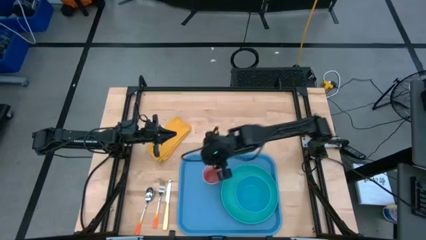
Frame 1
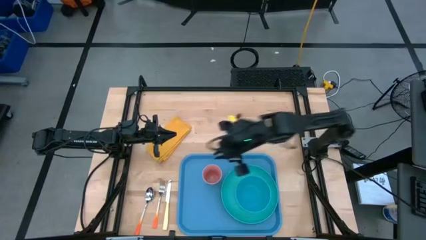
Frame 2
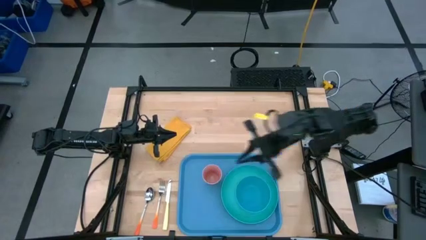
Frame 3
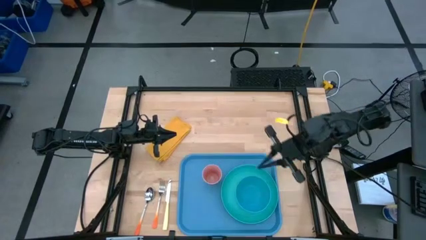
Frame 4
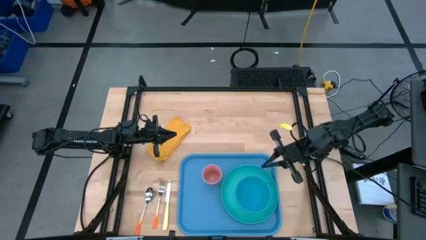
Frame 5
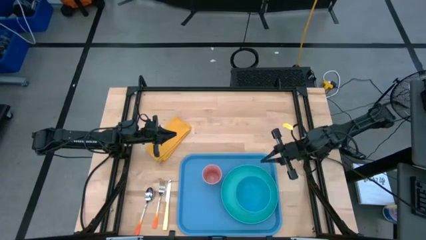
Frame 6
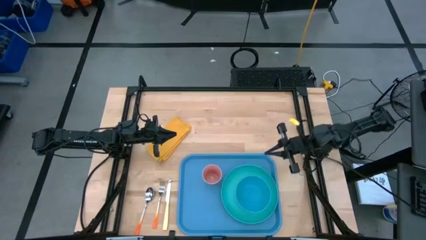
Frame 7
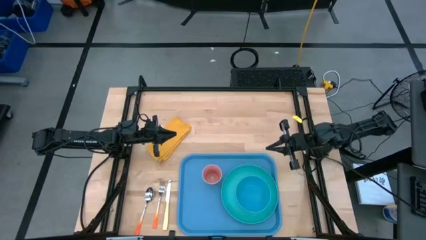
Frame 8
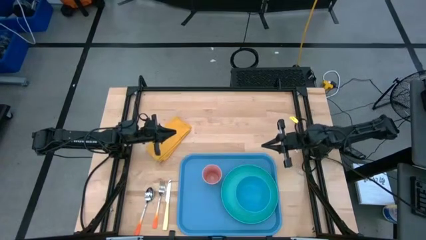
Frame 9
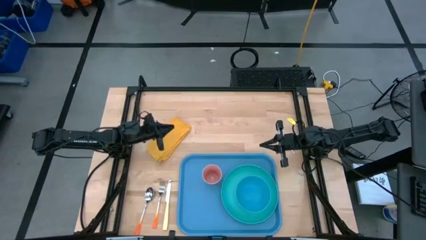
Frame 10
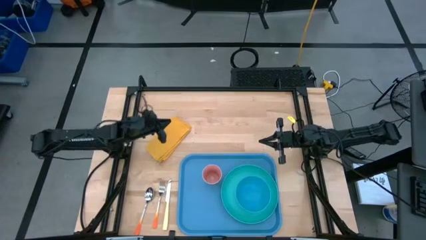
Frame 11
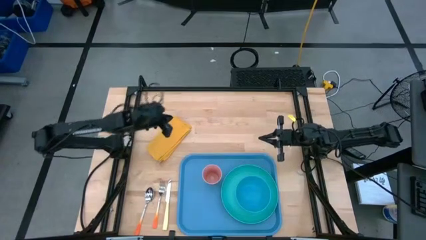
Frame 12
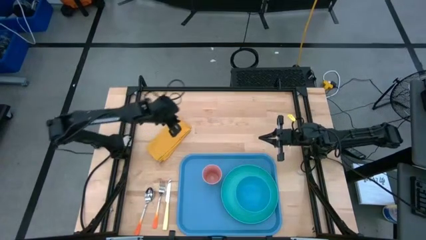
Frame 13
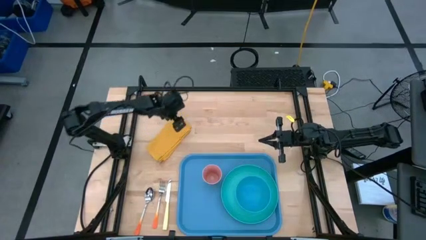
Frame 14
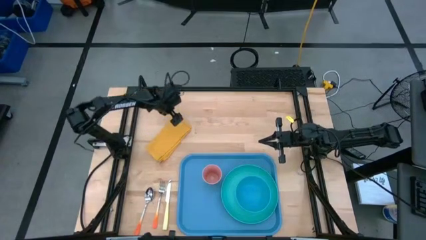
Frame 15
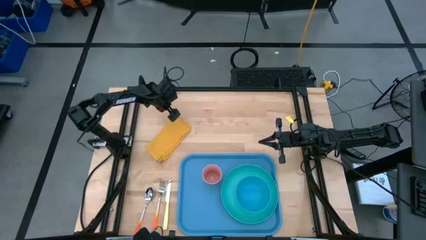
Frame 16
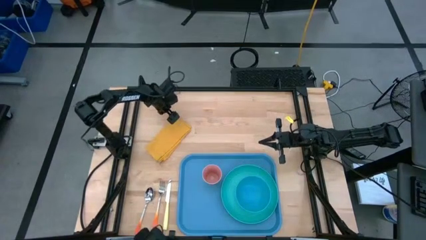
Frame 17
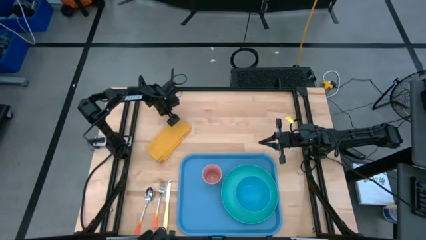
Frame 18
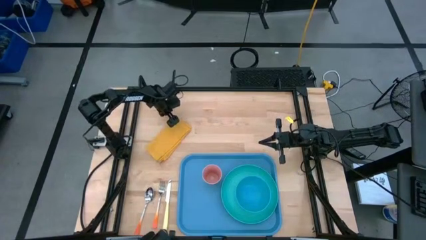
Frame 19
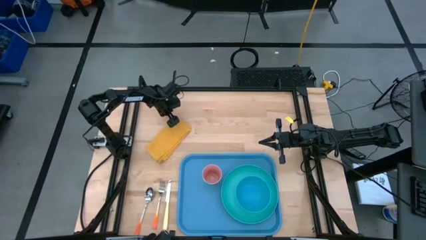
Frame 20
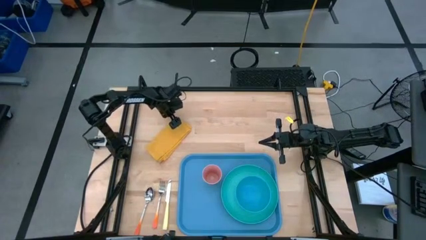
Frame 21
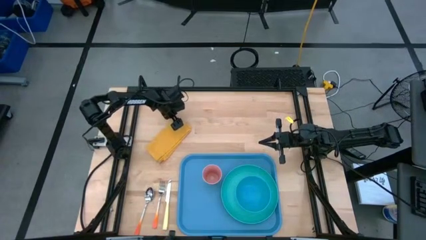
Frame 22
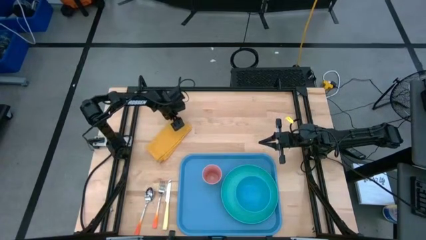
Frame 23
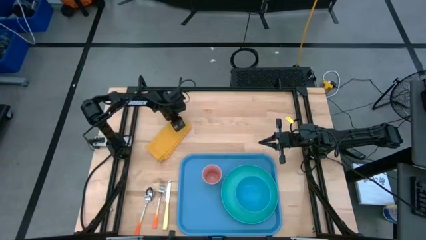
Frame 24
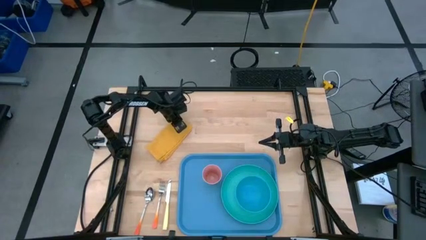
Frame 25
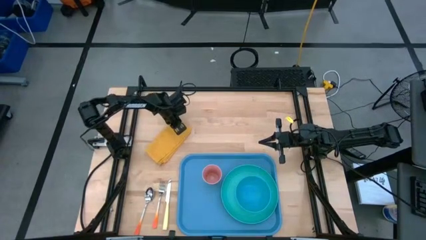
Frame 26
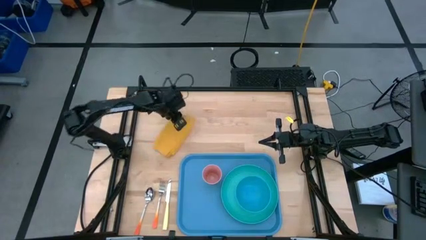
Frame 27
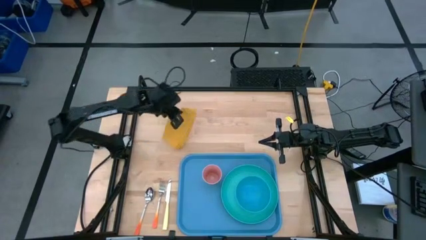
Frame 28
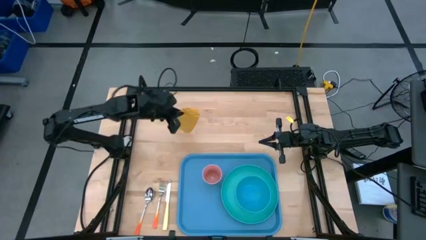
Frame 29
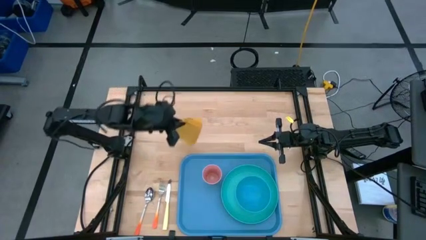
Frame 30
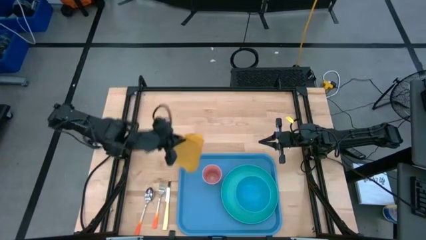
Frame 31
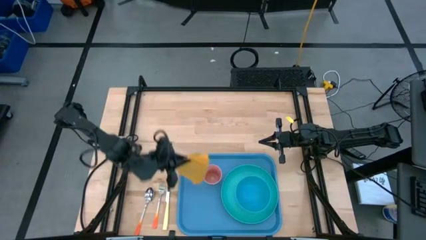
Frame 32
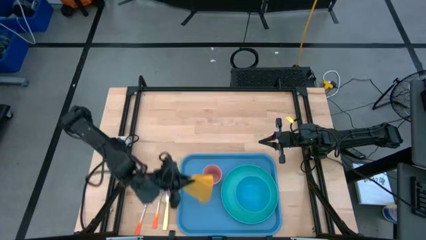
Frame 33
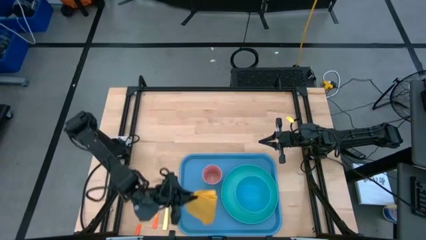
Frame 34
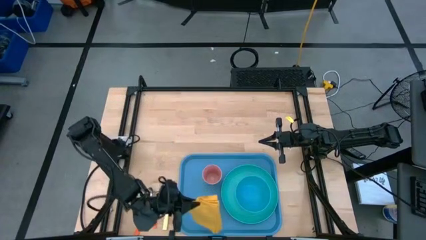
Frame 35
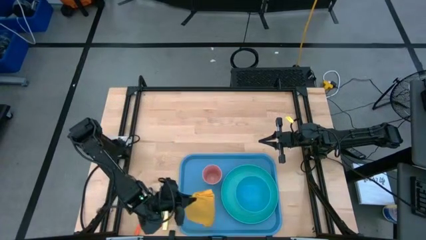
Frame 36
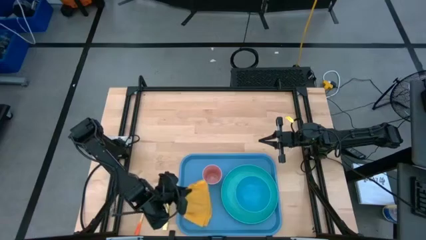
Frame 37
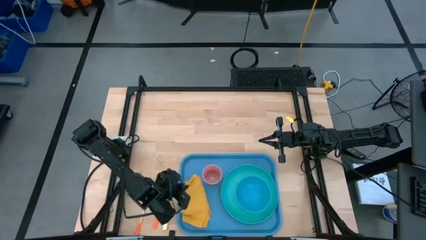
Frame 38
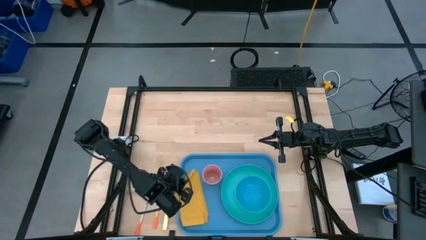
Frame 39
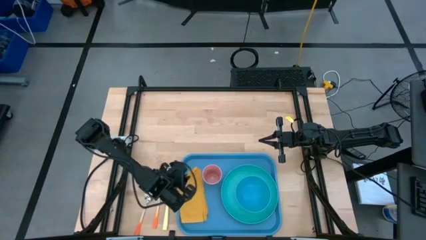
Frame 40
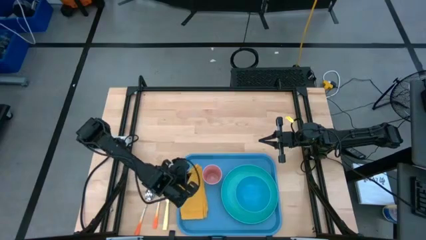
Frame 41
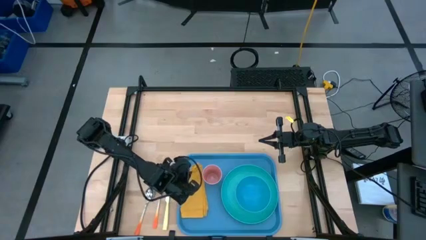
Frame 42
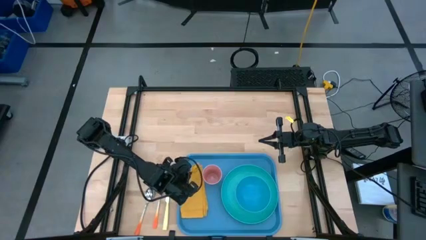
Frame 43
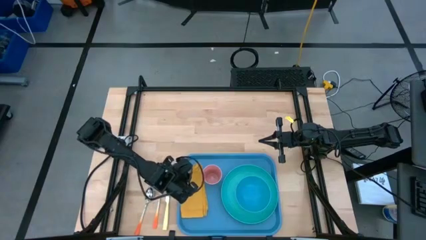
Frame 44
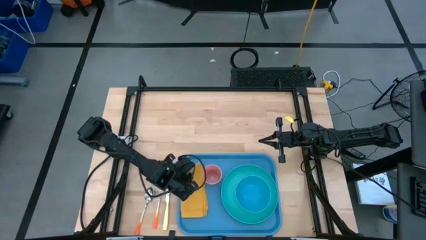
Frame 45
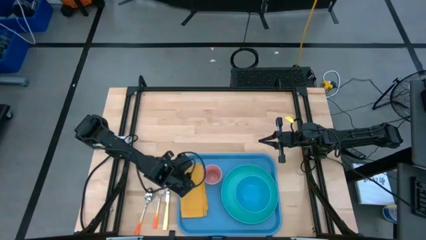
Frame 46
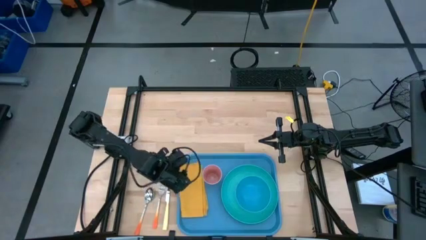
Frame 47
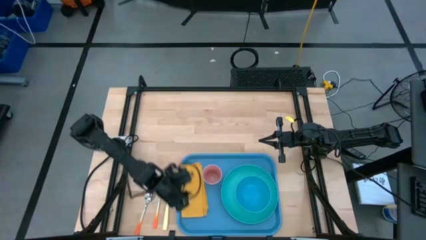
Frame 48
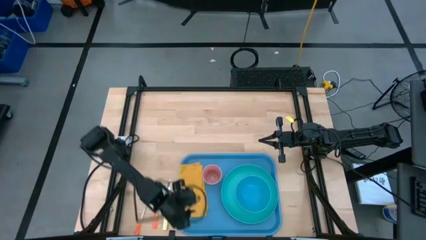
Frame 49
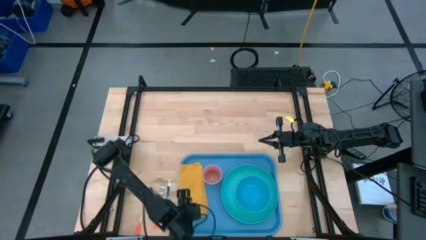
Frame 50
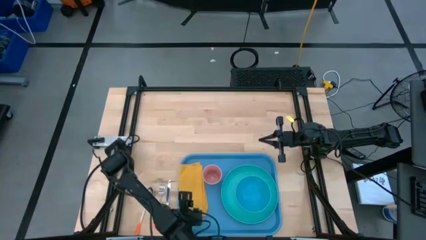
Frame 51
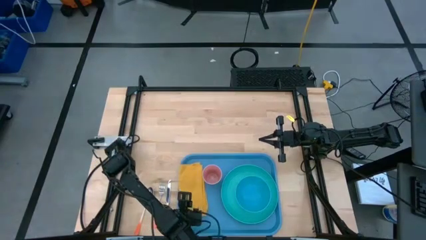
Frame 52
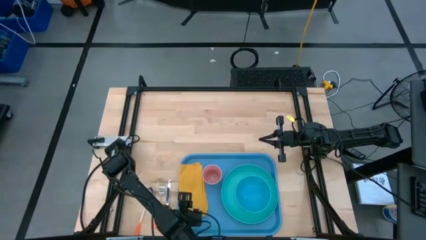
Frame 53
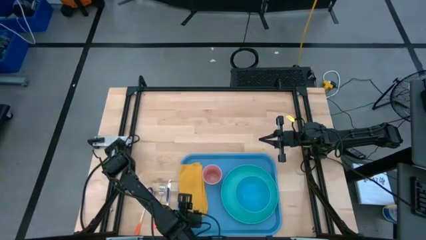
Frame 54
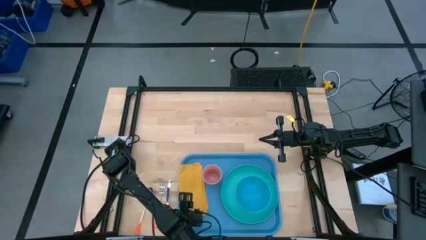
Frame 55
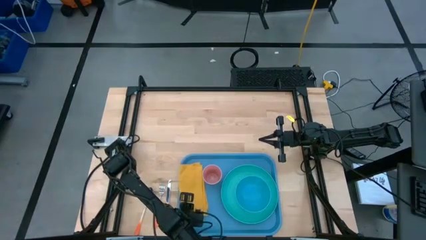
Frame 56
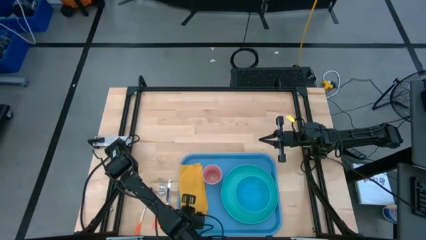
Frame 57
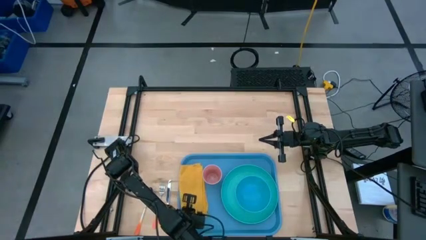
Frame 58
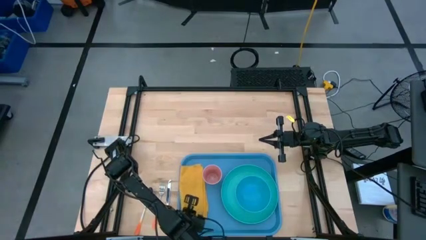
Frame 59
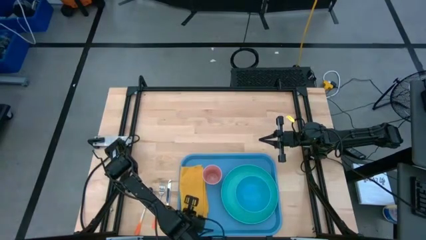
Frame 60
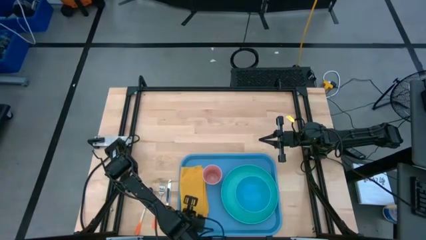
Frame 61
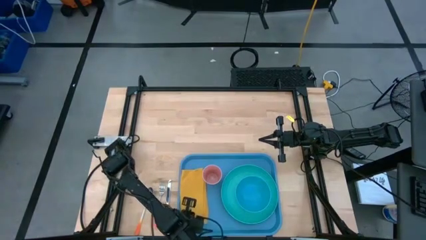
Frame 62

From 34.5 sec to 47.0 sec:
Task: Set up tray
Put the yellow napkin on the blue serving tray to the left of the green plate

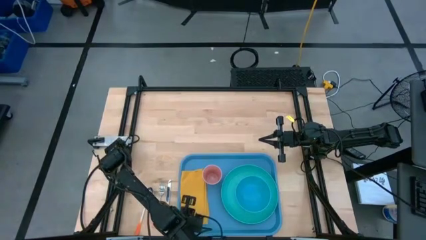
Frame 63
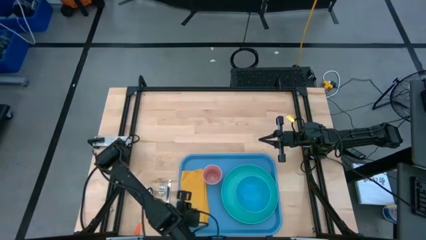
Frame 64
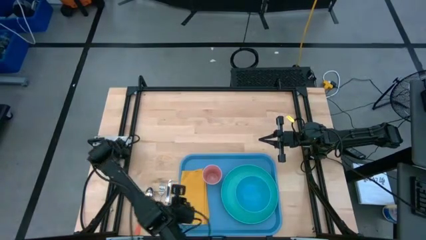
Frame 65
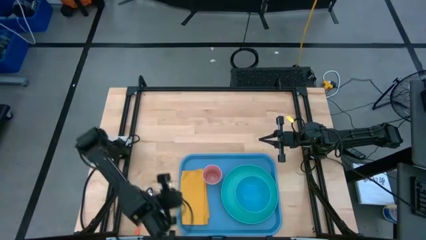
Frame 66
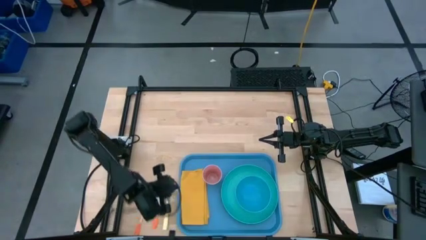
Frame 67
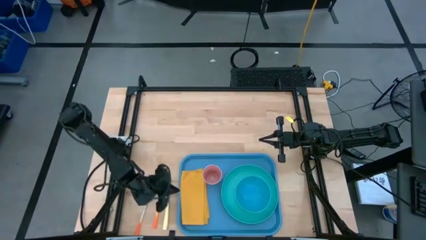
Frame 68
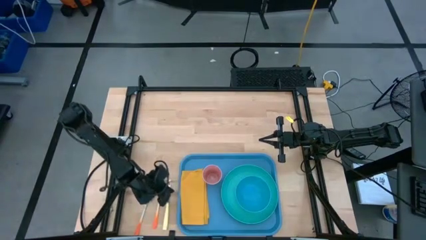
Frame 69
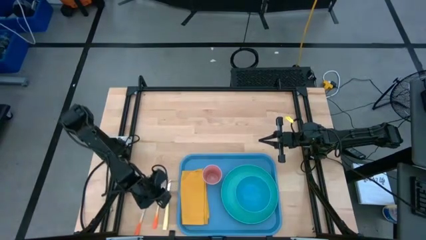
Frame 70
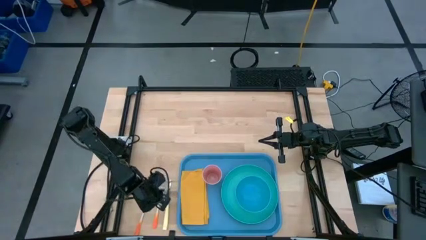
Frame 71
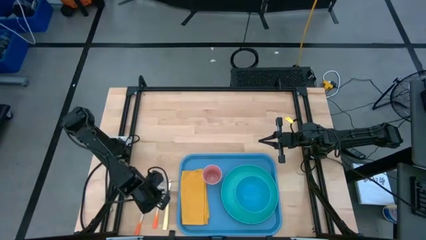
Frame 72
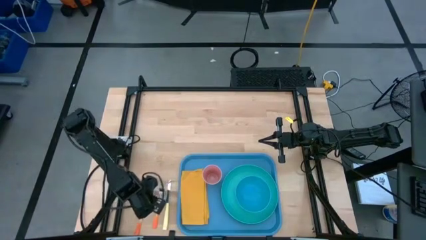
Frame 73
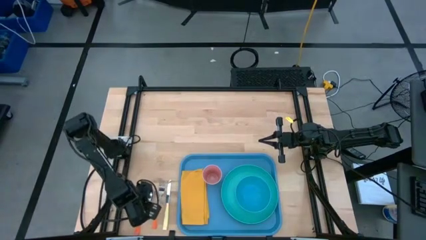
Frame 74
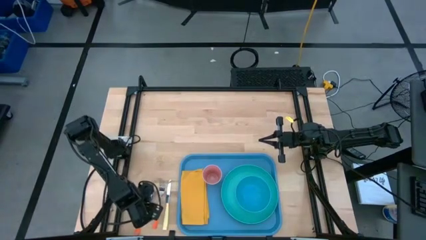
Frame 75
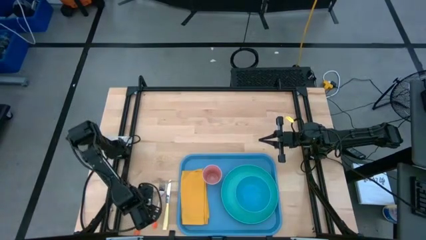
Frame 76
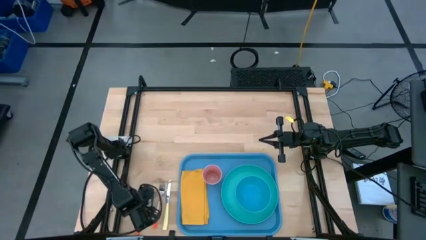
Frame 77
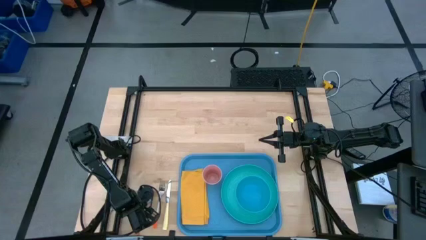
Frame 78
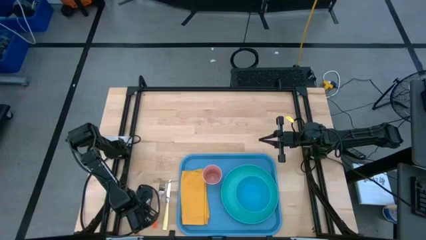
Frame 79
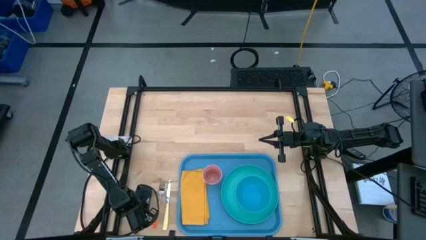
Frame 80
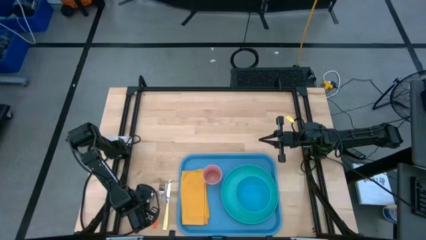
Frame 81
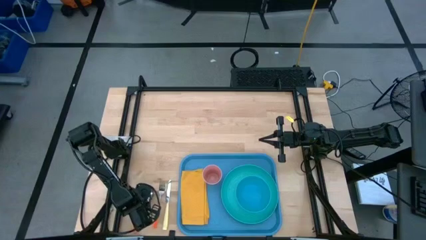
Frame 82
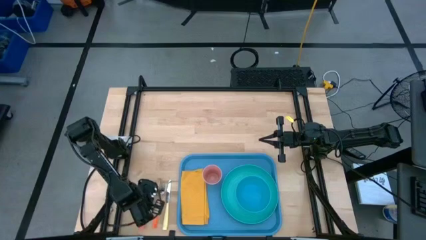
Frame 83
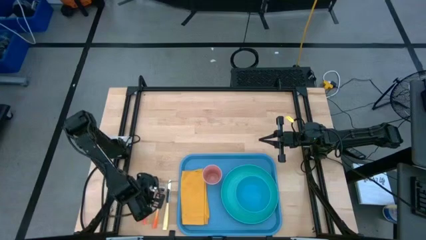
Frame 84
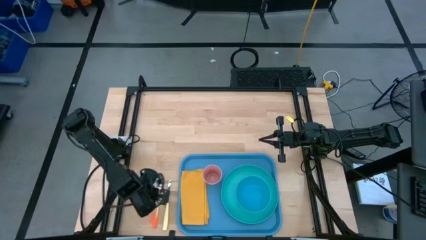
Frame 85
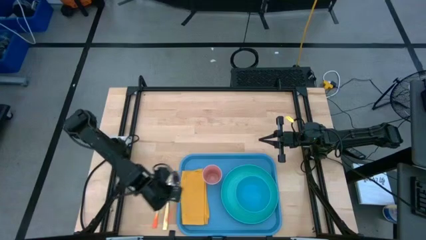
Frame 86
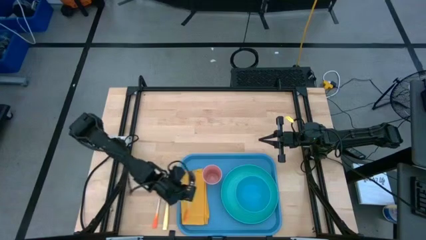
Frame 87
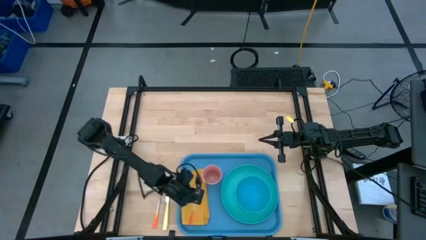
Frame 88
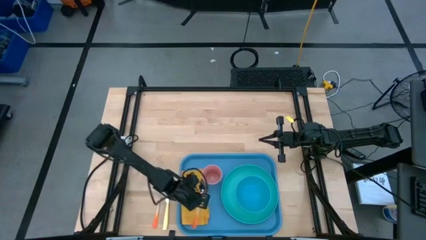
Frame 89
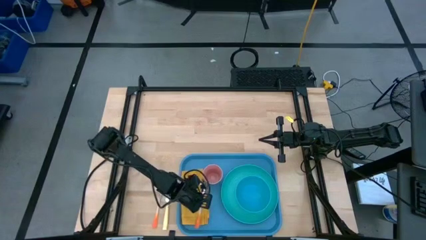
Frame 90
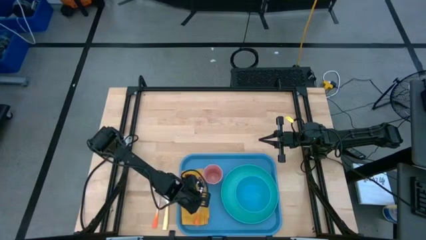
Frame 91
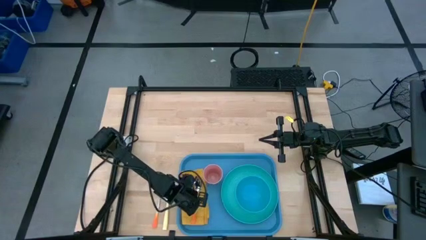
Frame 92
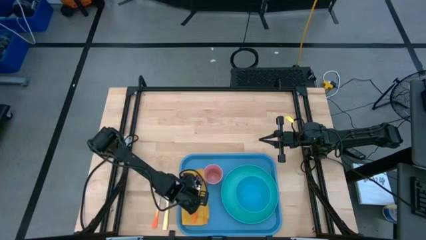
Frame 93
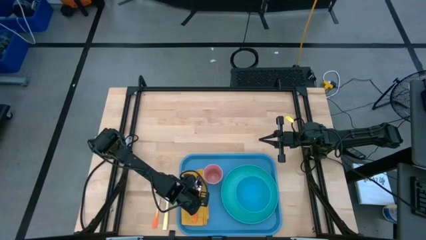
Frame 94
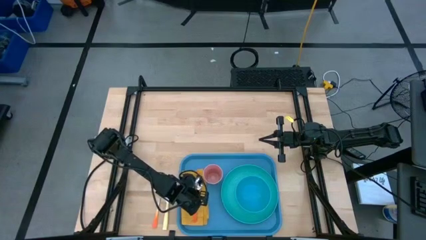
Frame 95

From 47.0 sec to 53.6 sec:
Put the orange spoon on top of the yellow napkin
